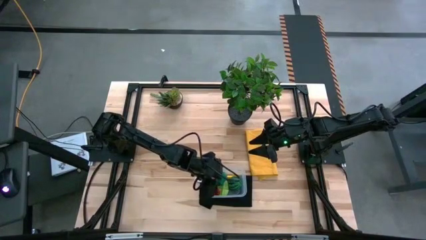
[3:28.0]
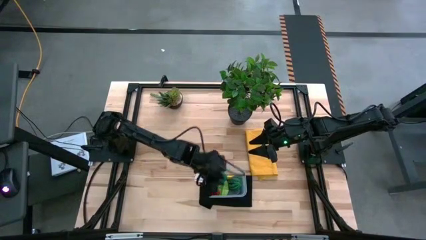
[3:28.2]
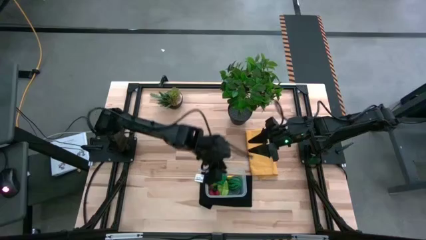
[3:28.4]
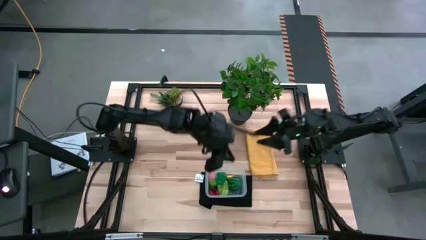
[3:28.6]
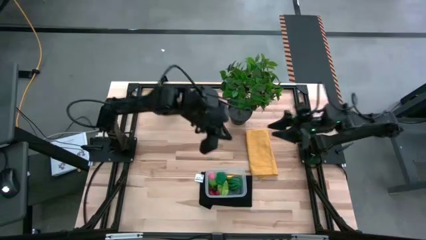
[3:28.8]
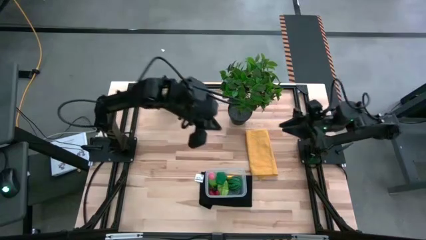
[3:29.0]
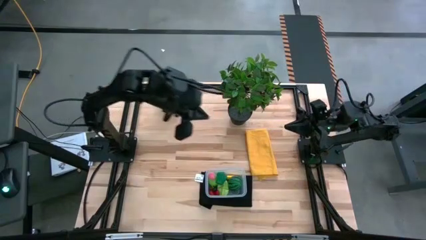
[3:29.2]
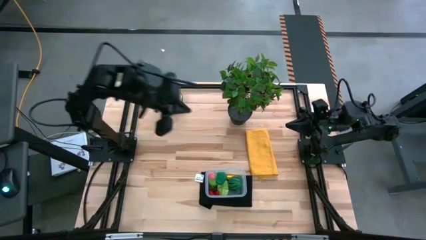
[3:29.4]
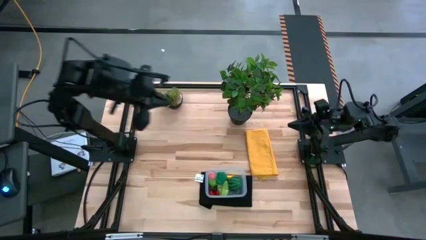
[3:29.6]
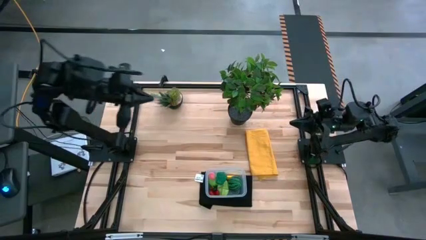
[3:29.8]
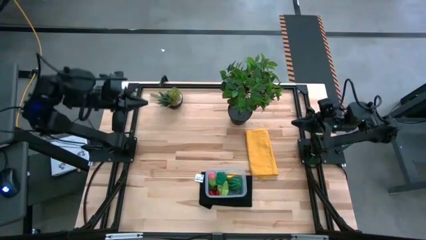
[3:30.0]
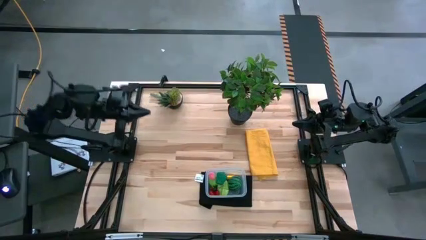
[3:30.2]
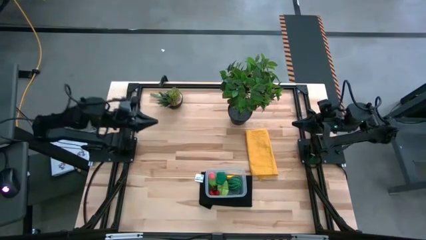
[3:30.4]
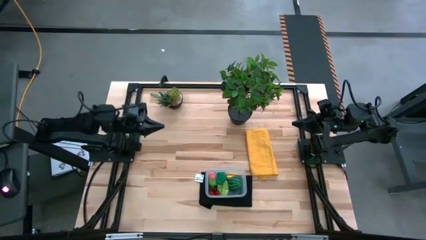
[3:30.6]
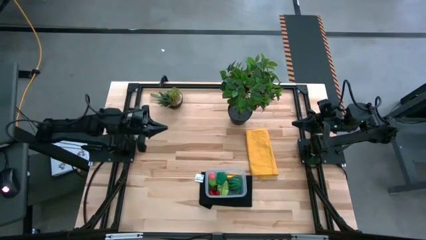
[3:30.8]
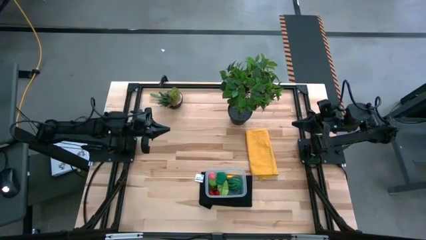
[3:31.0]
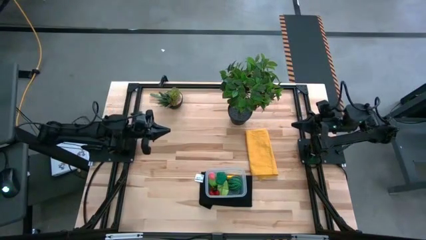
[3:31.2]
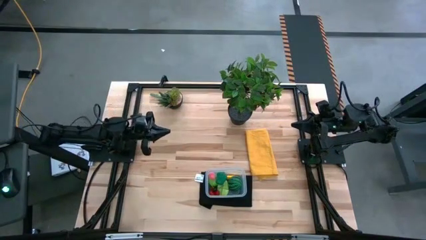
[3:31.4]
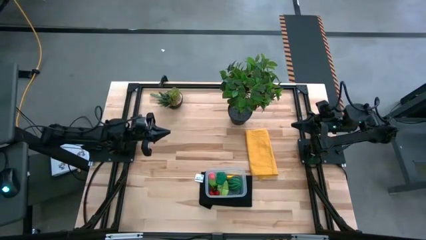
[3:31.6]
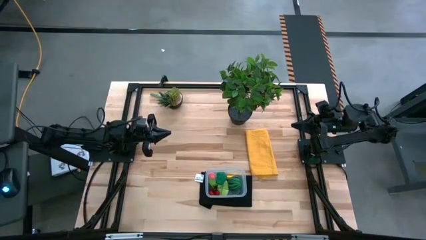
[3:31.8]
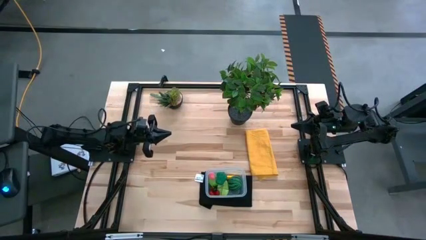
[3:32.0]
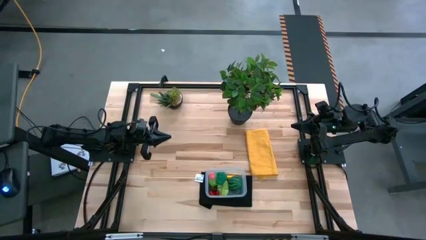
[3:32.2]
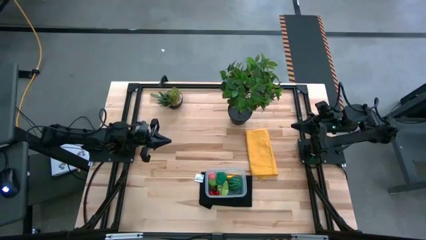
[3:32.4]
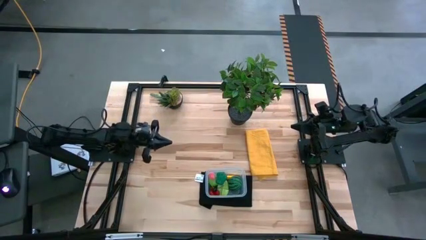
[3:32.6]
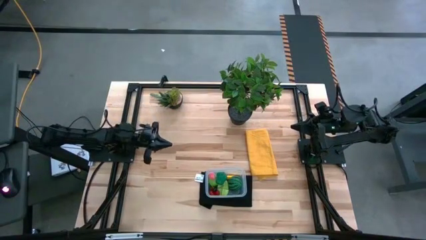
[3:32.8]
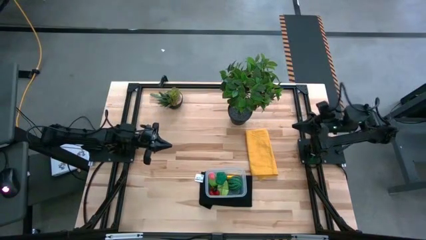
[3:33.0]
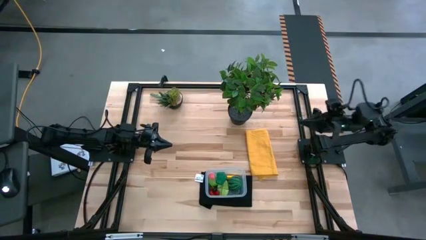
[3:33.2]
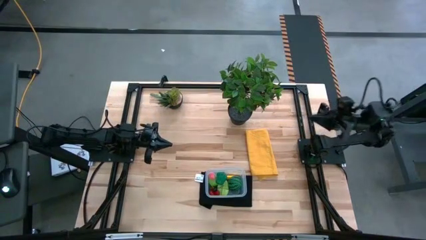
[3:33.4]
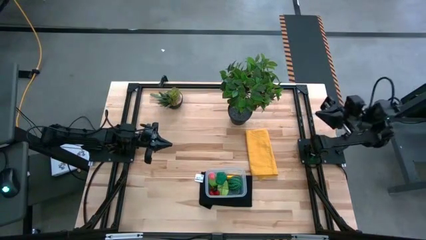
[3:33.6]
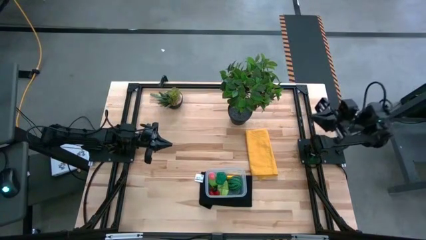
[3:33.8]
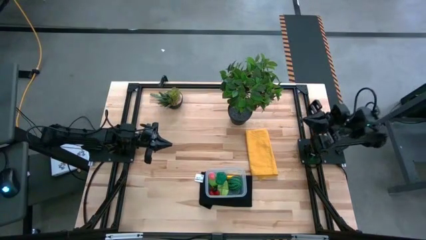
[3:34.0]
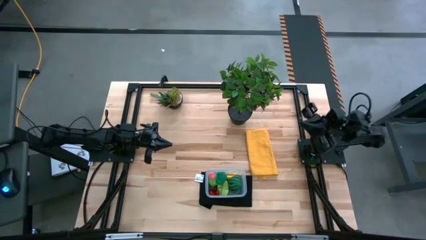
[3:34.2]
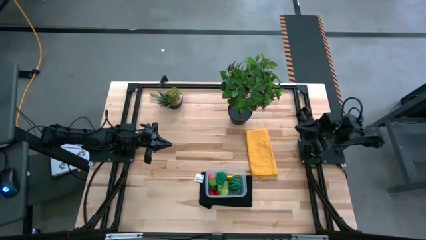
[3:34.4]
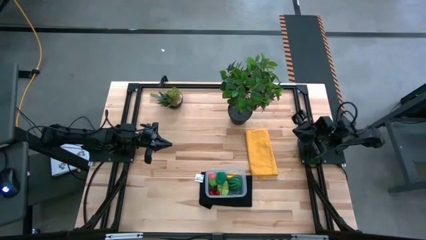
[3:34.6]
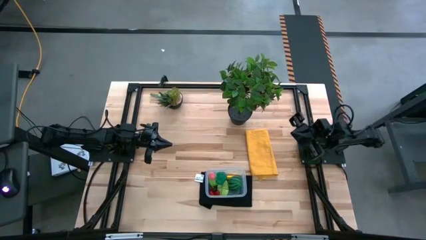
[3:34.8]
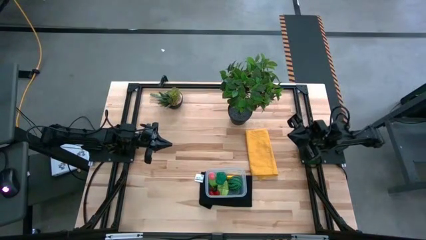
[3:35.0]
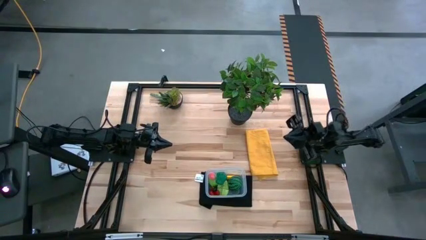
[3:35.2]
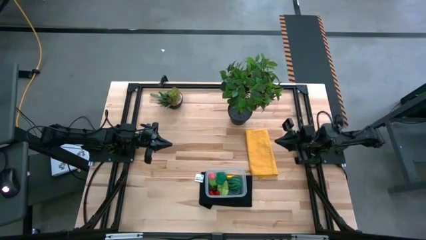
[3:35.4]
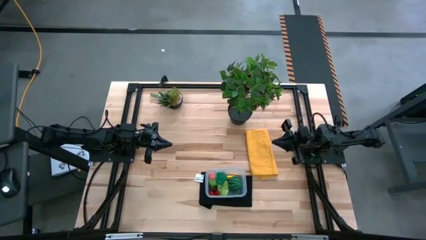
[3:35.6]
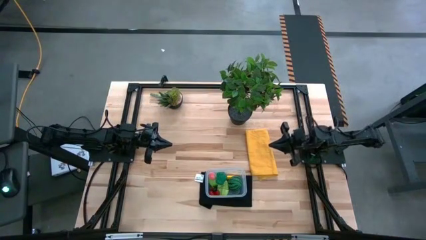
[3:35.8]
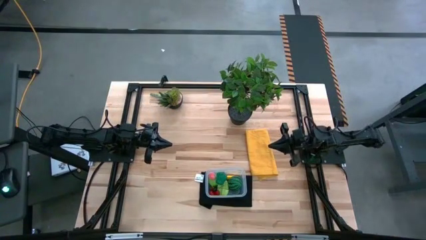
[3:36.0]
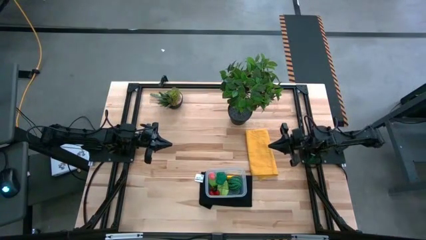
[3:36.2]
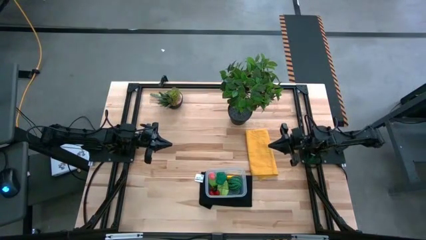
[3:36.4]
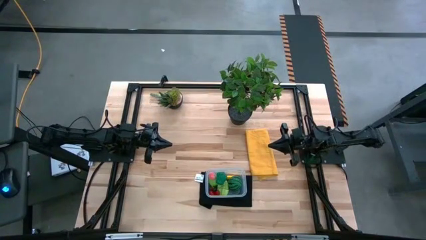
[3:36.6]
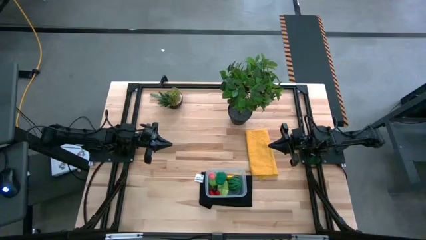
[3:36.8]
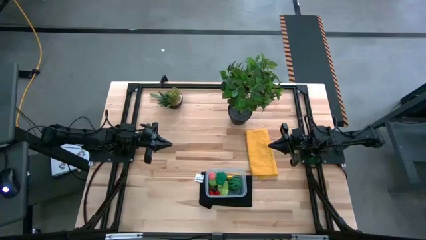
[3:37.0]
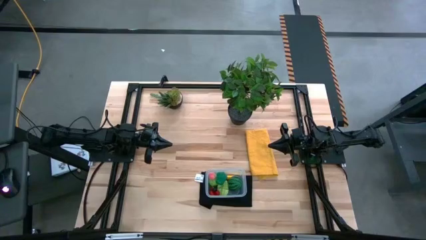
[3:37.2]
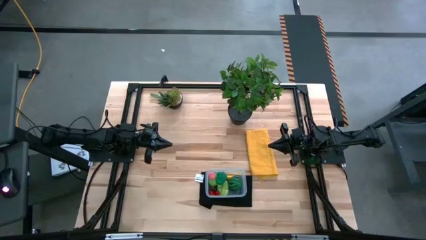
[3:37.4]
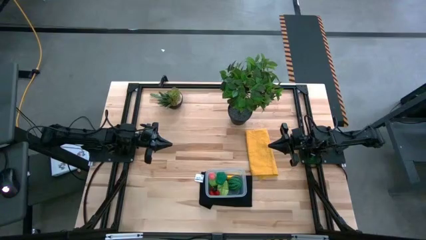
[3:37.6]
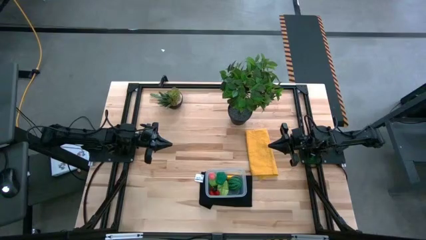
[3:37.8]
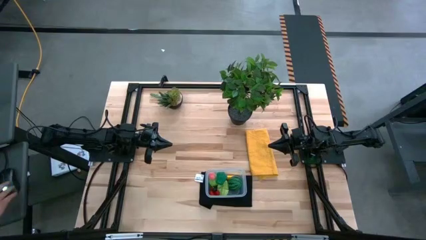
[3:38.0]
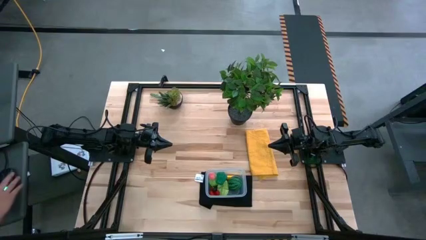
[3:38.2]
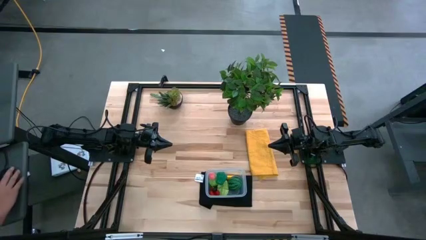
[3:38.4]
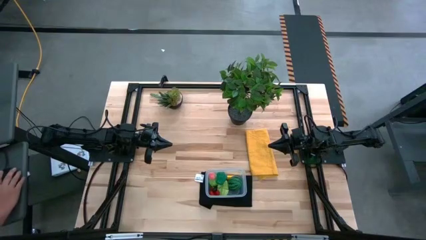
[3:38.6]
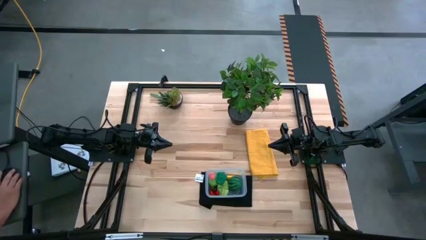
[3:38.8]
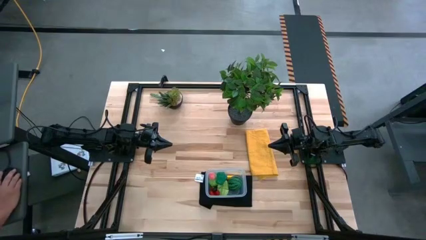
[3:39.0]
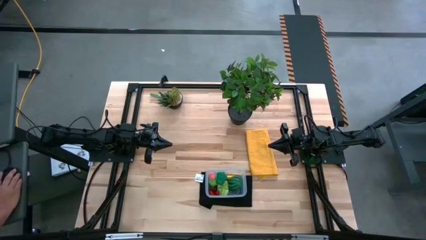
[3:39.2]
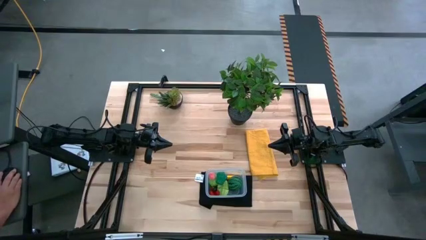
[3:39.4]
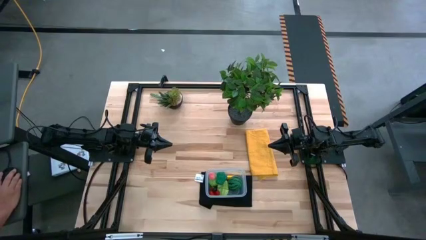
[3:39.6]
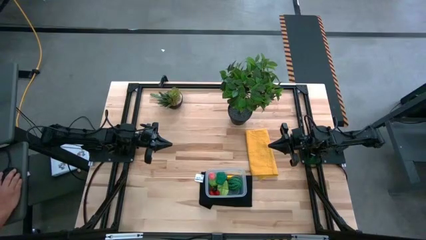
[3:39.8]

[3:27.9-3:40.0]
Task: Pick and placing Produce into tupperware
Return to Home Position

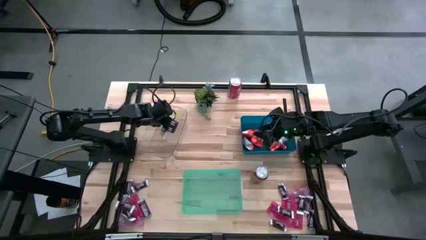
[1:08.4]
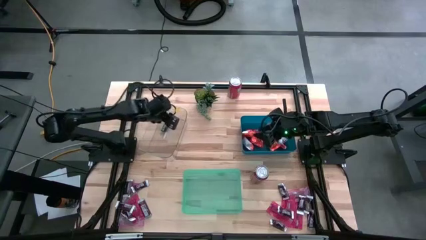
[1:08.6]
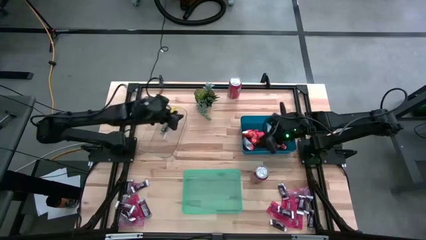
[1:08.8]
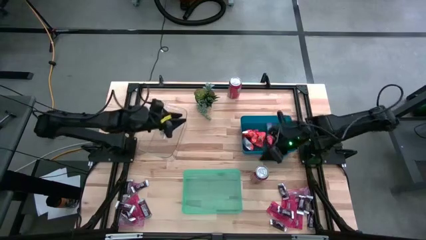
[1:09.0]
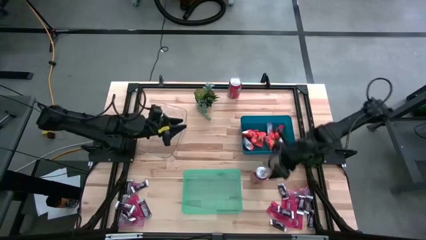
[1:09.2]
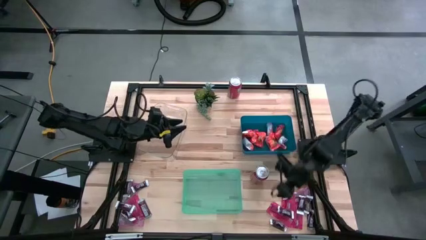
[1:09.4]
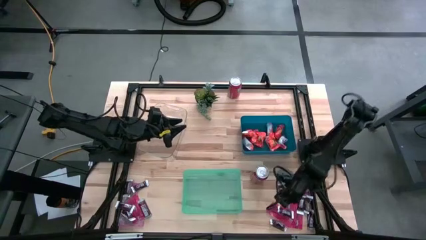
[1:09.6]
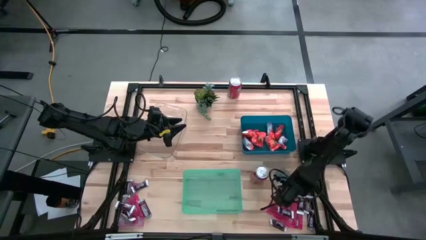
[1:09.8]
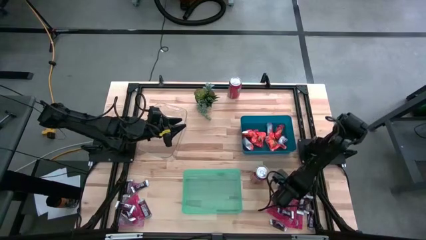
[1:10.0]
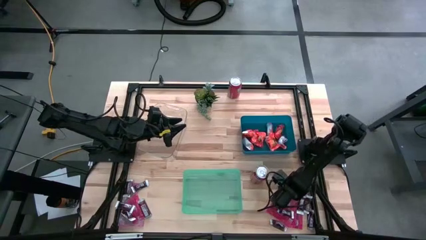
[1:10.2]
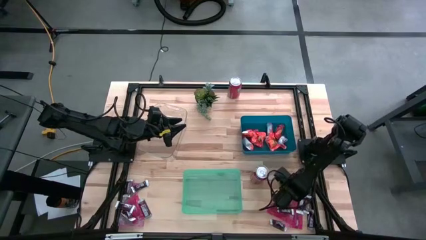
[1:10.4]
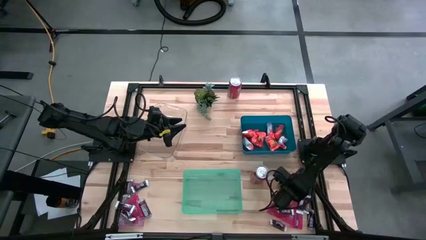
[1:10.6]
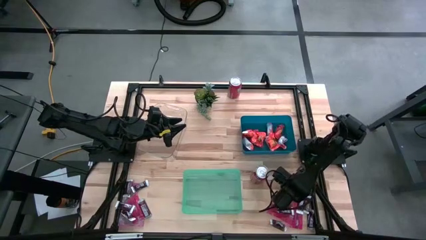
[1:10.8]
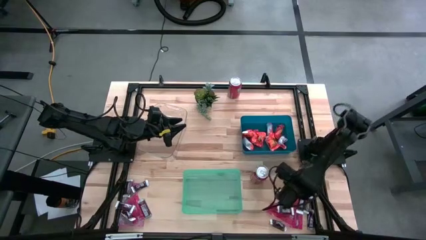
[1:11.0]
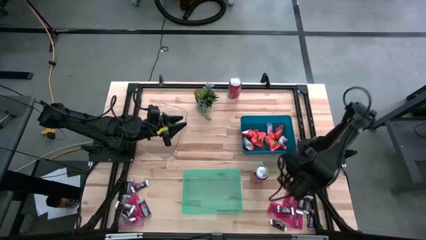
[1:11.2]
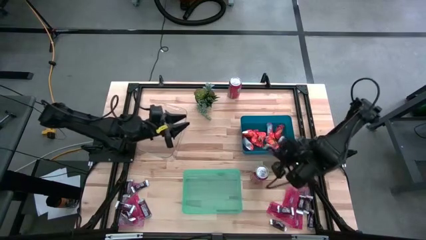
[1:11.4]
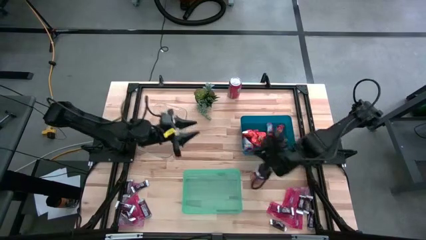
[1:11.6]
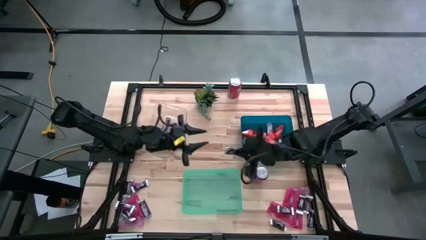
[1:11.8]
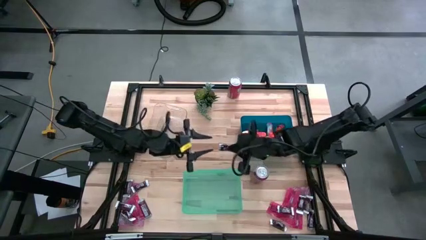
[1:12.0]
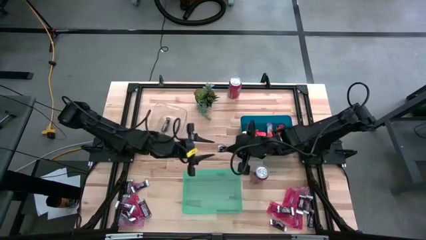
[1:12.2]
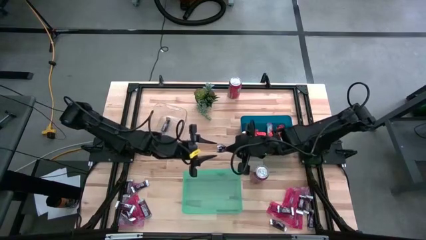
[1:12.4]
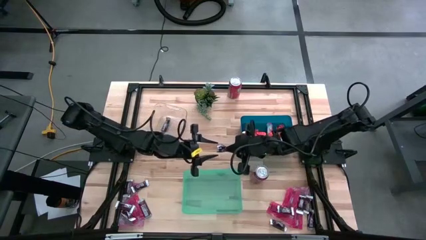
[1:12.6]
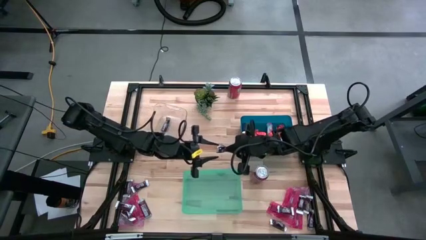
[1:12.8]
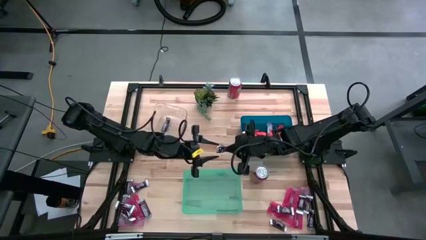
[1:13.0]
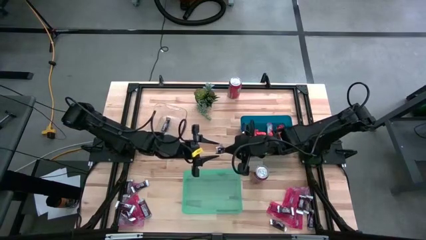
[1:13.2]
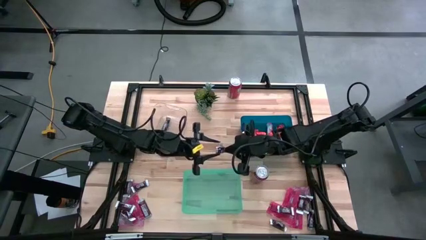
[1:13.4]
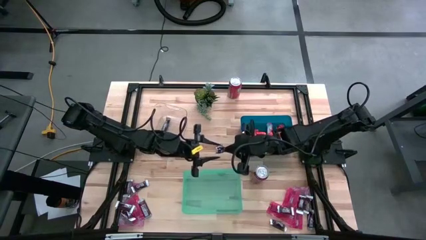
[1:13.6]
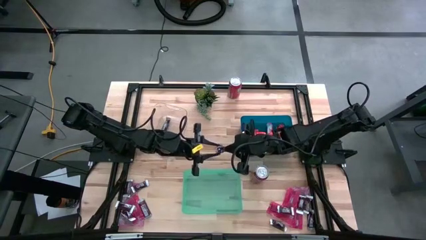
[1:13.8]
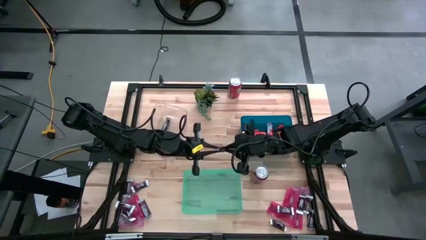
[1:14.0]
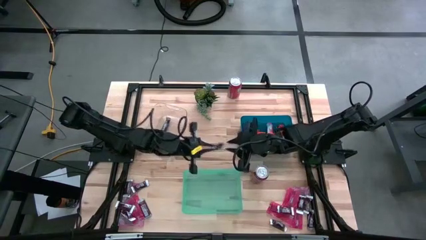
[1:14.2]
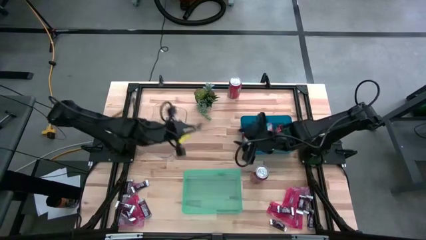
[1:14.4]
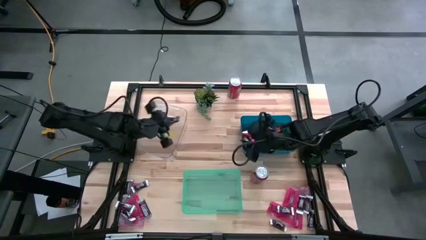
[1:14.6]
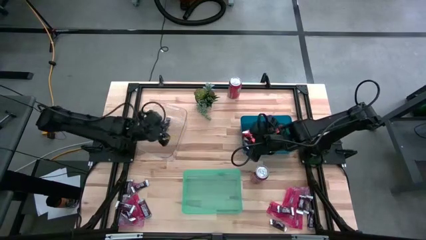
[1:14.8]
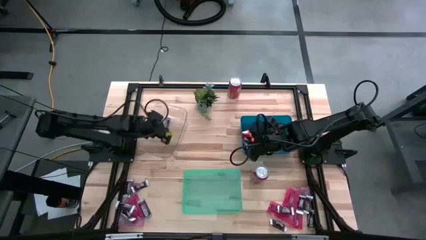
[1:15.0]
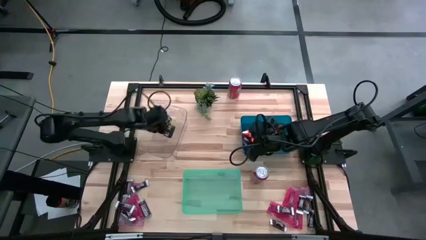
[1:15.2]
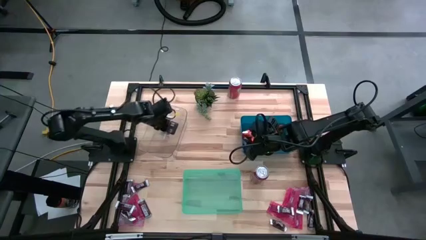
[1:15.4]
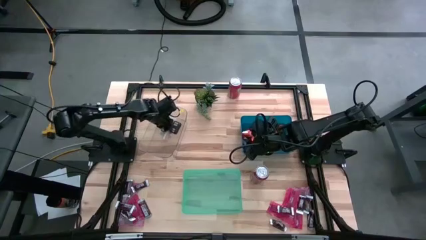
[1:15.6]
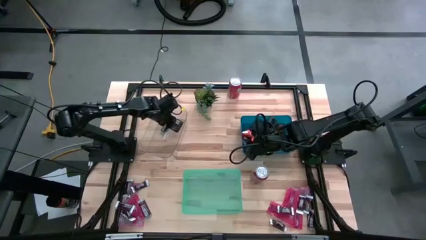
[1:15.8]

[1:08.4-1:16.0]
Task: Sort candy
Put the brown chocolate bar into the transparent bin
